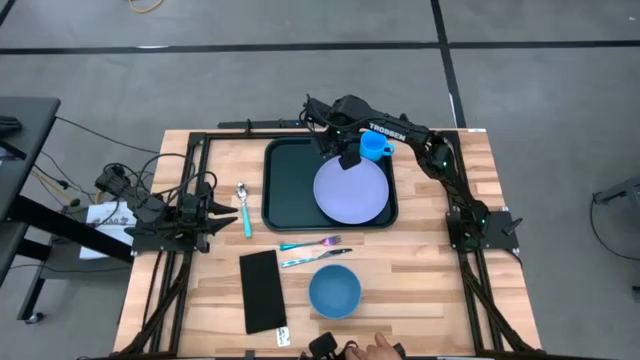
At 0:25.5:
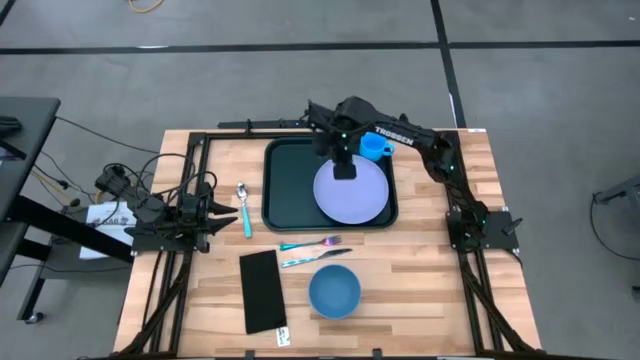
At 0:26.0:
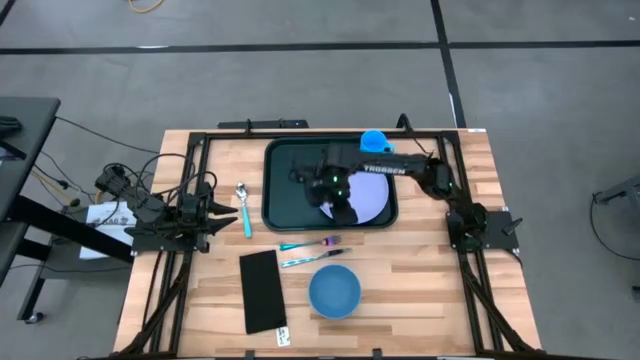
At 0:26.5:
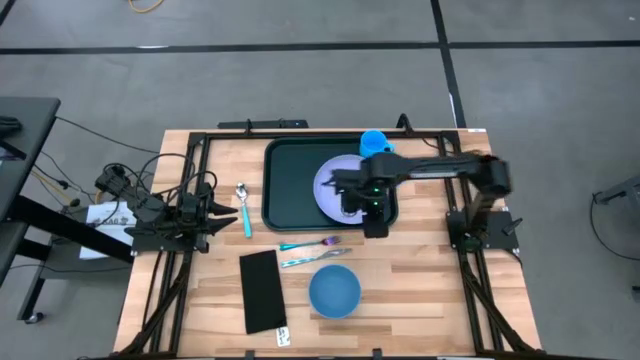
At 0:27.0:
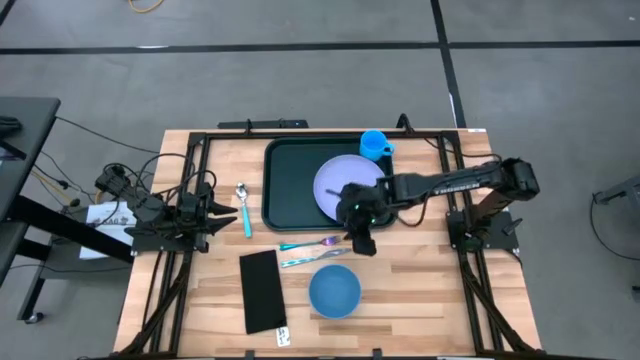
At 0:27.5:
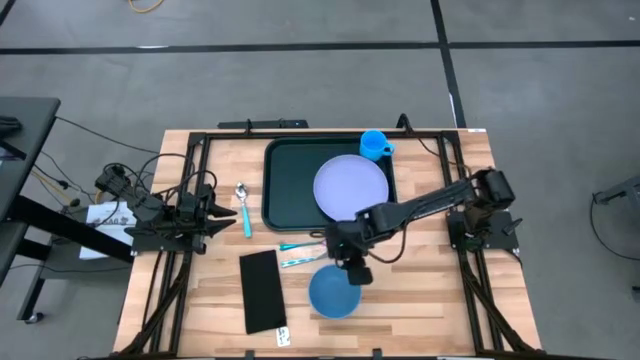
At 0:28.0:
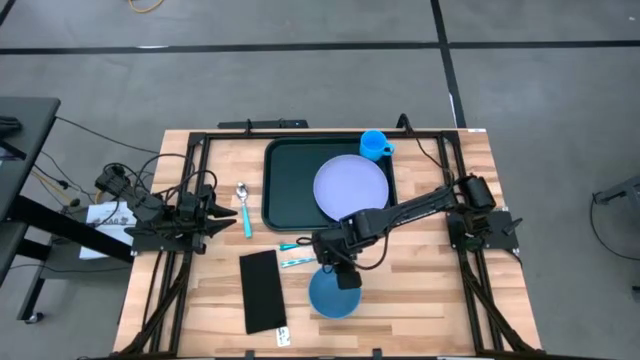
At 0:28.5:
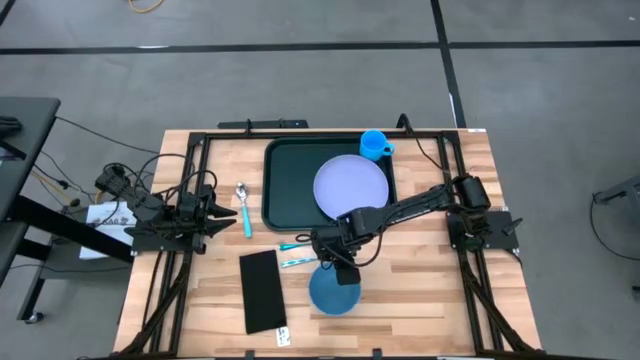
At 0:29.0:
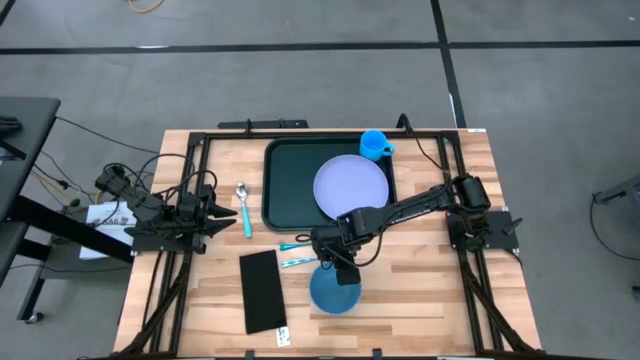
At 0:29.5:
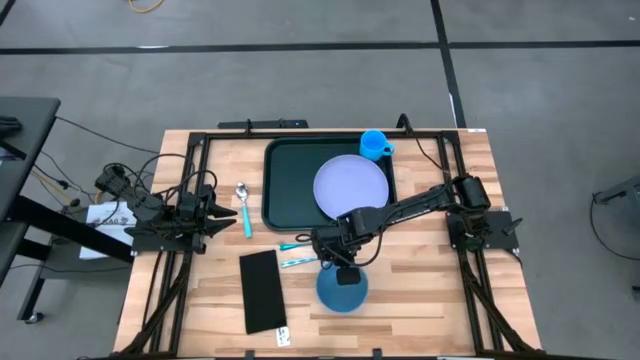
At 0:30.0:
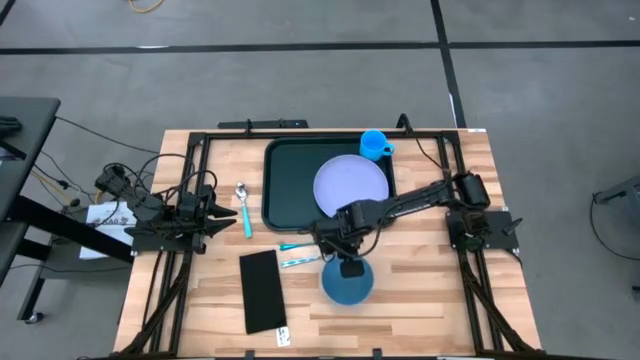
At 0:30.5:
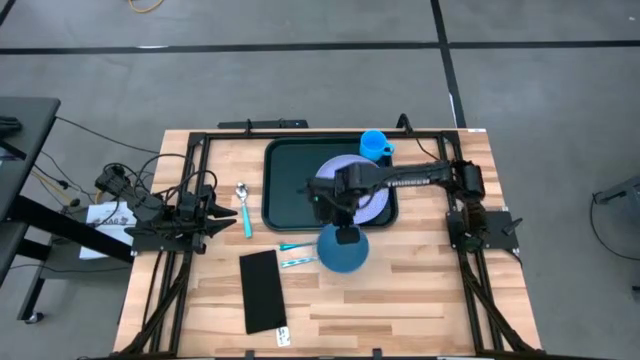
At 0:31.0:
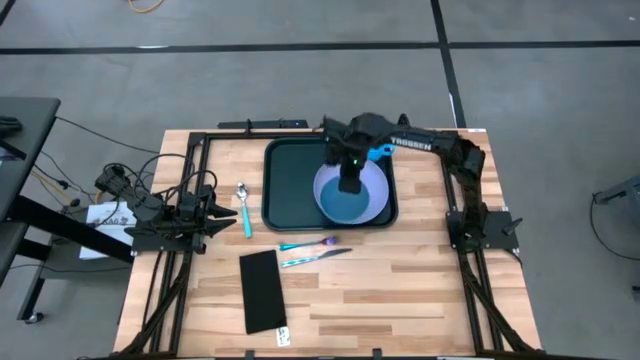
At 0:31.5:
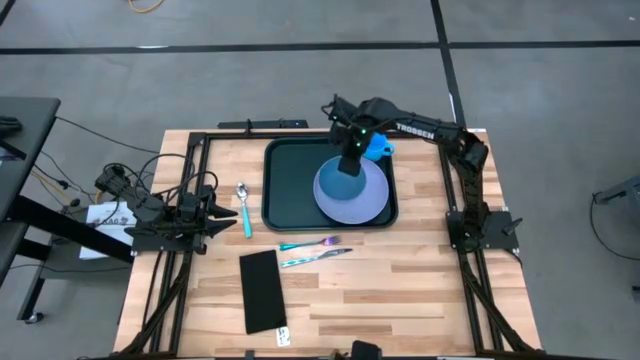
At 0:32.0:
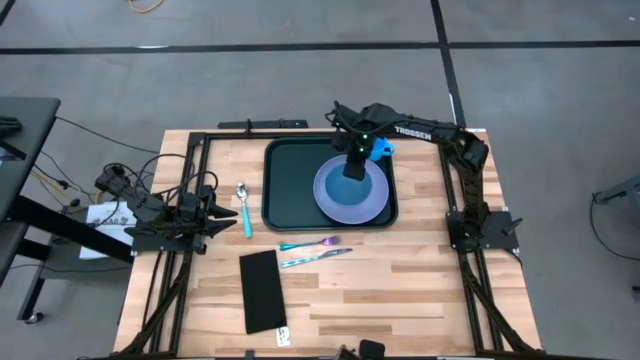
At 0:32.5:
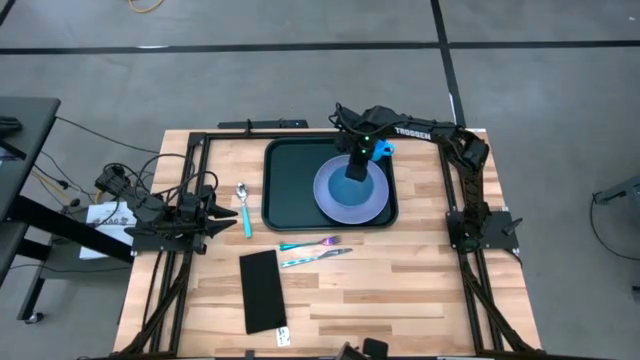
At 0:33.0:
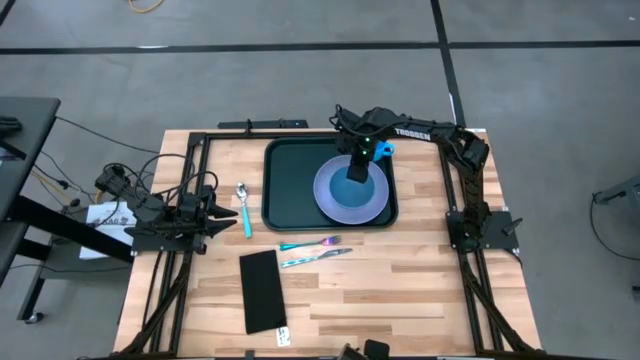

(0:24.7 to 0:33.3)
Task: Set up tray
Put the blue bowl on the light purple plate on the black serving tray

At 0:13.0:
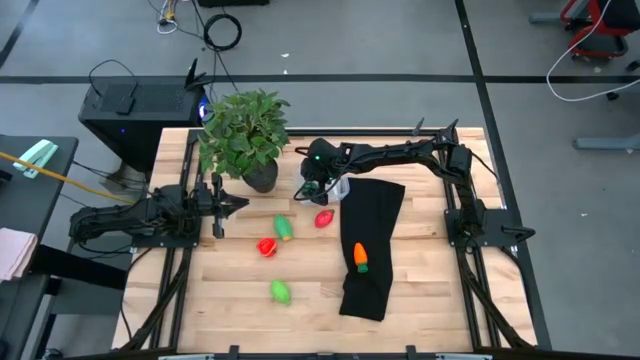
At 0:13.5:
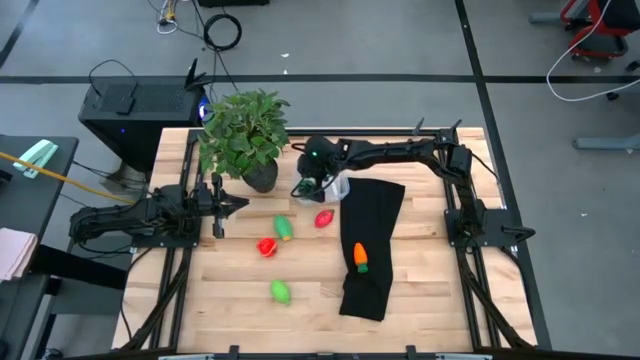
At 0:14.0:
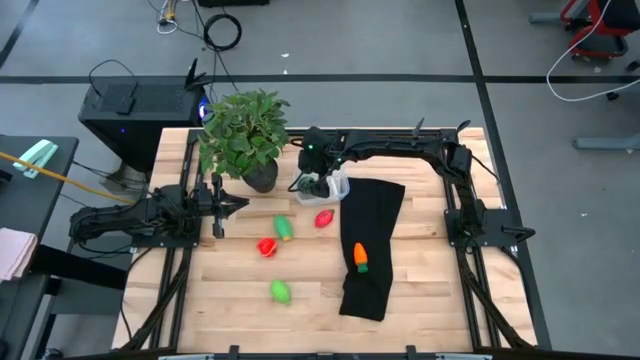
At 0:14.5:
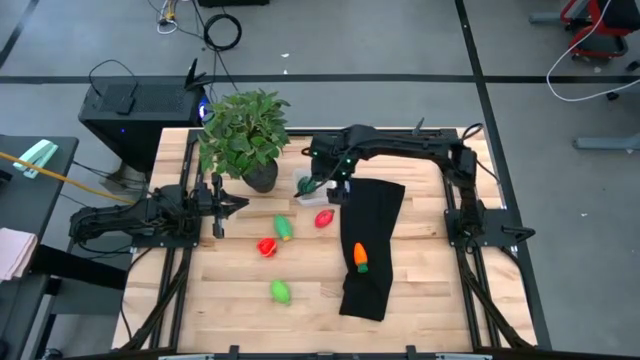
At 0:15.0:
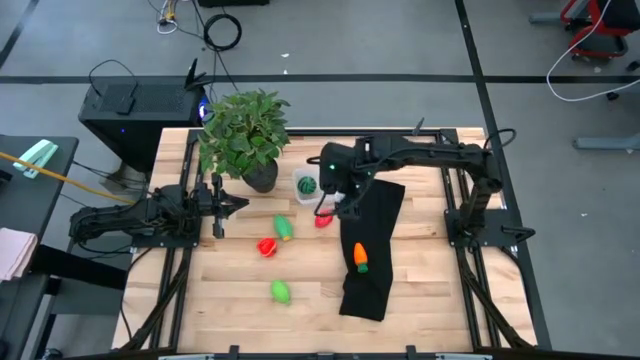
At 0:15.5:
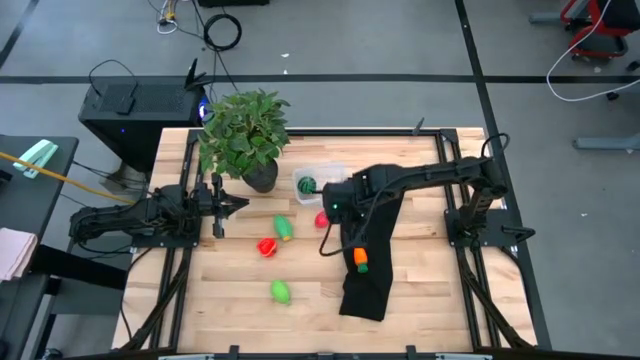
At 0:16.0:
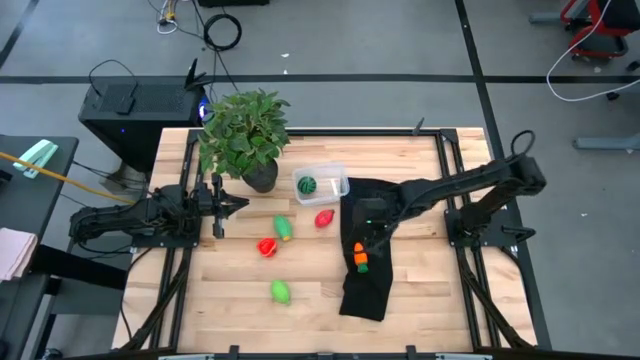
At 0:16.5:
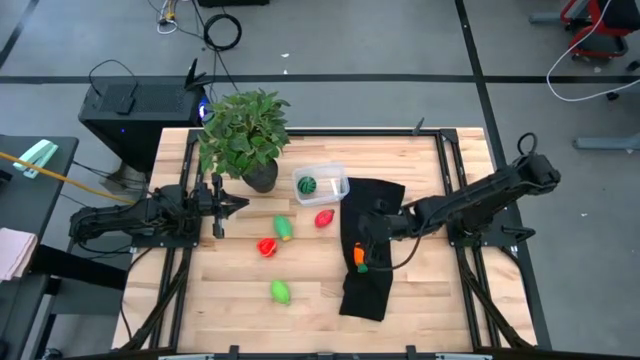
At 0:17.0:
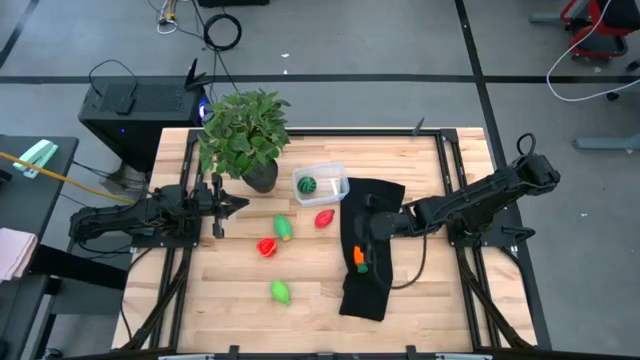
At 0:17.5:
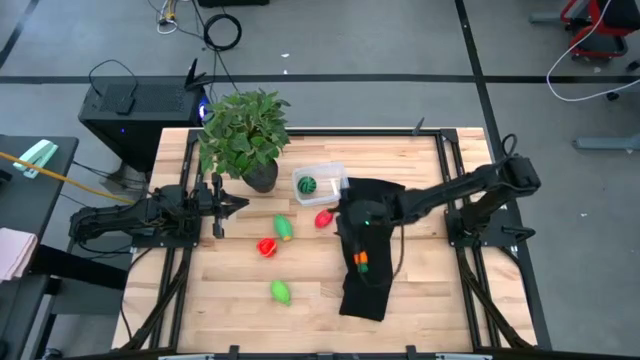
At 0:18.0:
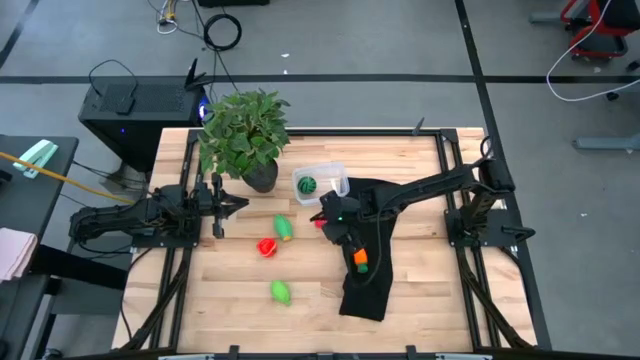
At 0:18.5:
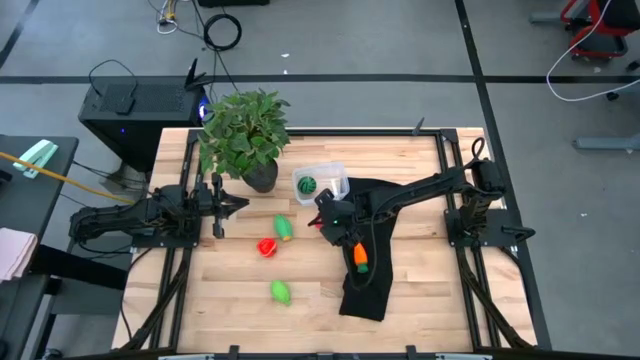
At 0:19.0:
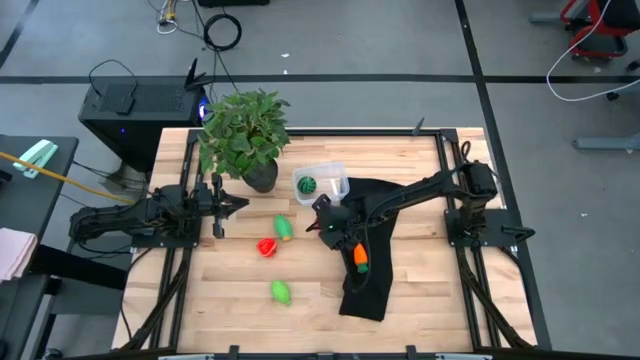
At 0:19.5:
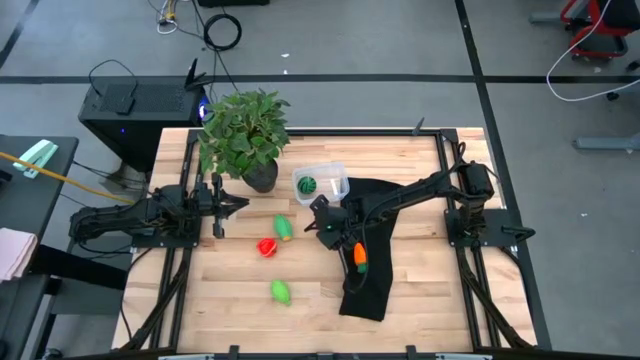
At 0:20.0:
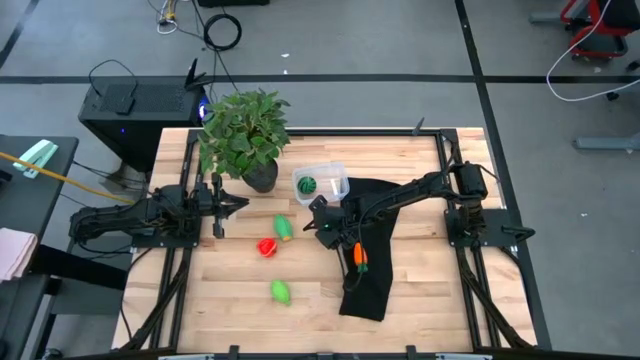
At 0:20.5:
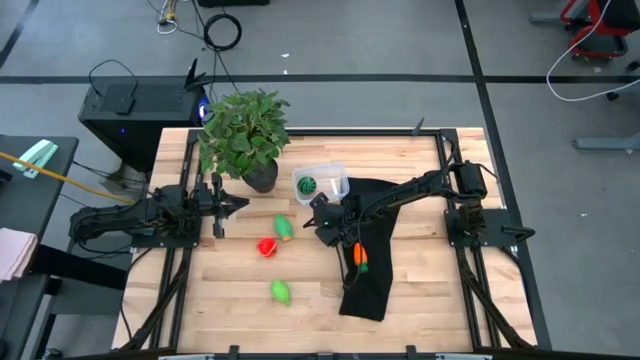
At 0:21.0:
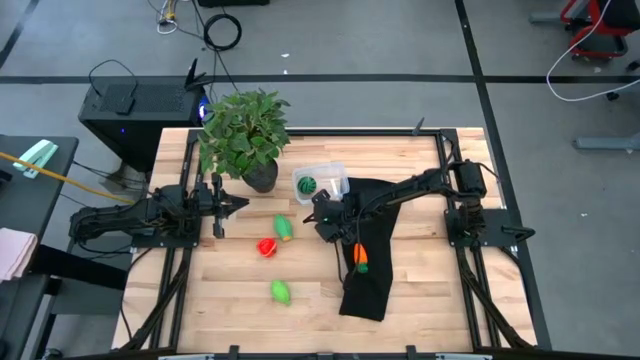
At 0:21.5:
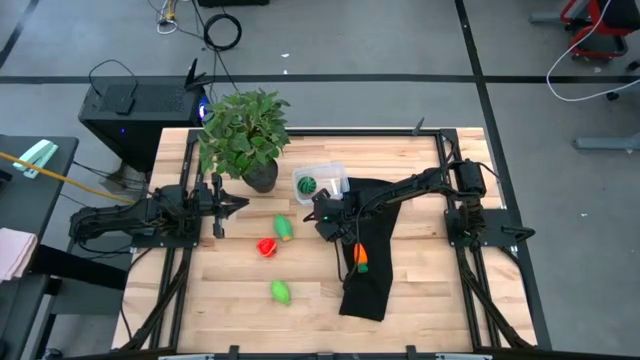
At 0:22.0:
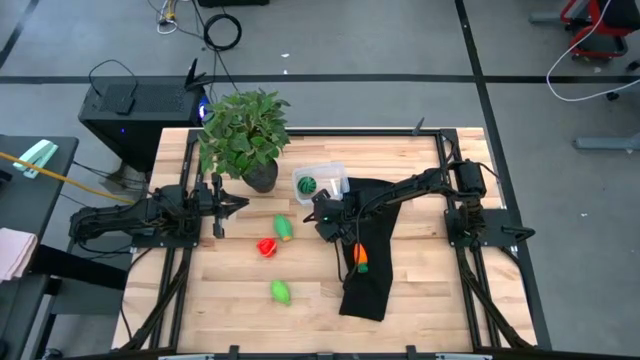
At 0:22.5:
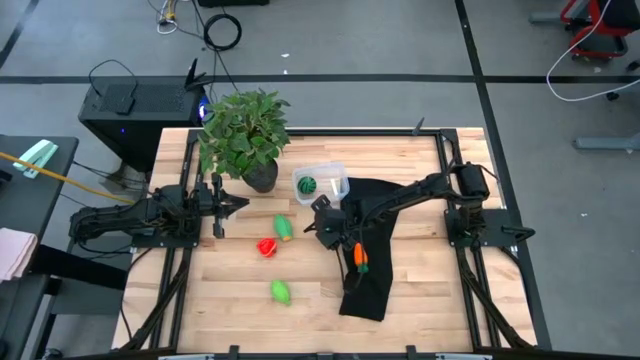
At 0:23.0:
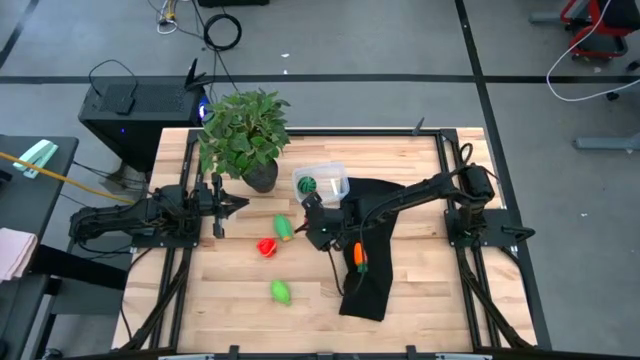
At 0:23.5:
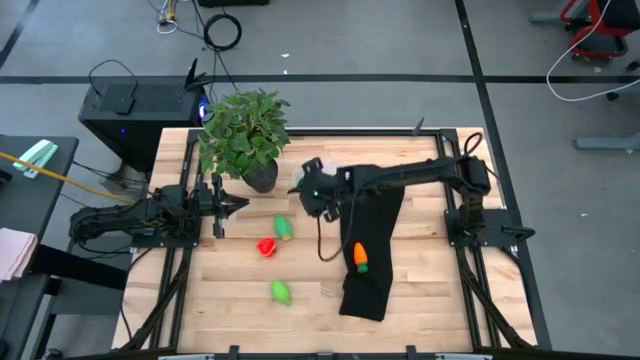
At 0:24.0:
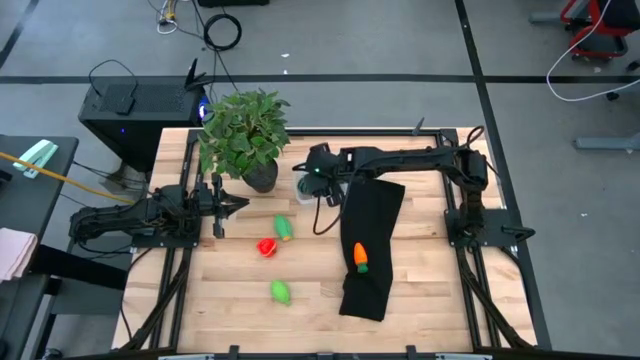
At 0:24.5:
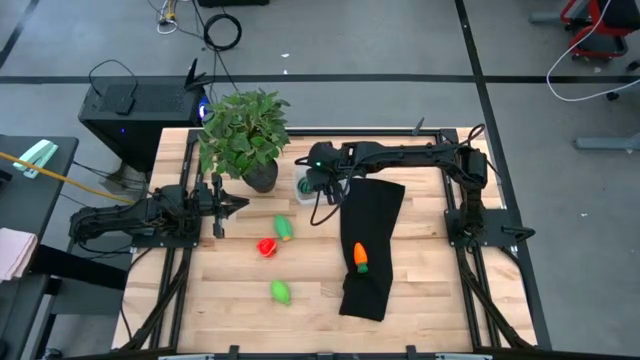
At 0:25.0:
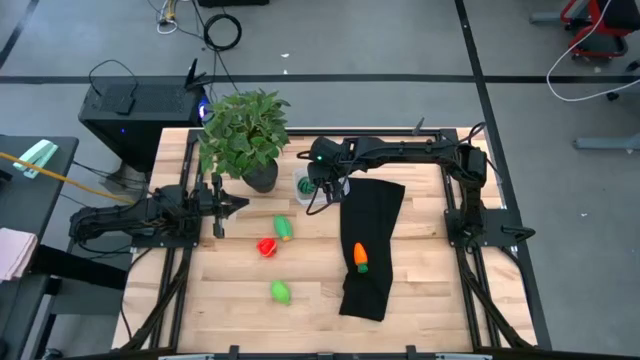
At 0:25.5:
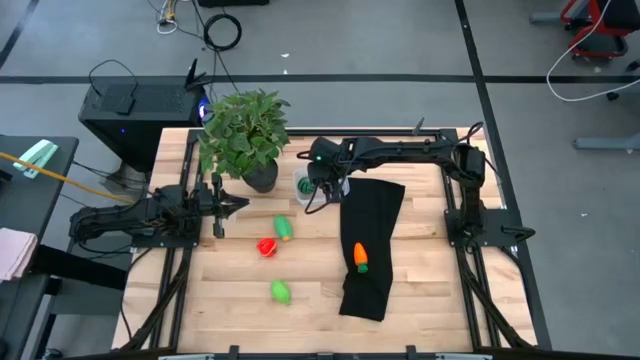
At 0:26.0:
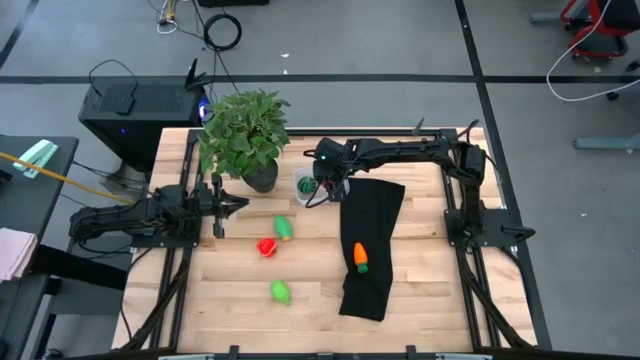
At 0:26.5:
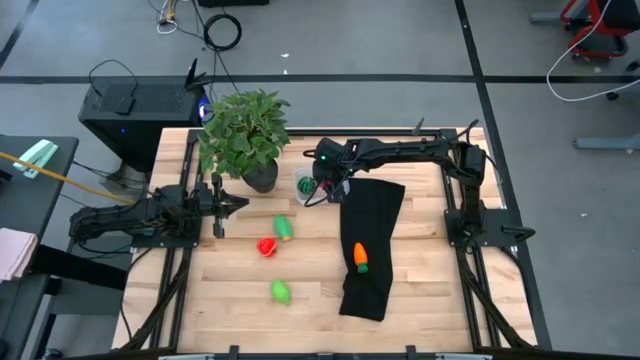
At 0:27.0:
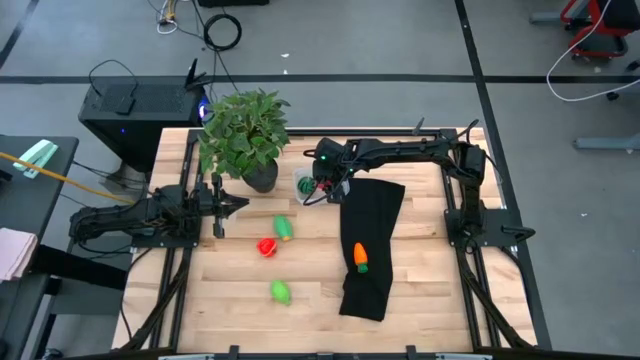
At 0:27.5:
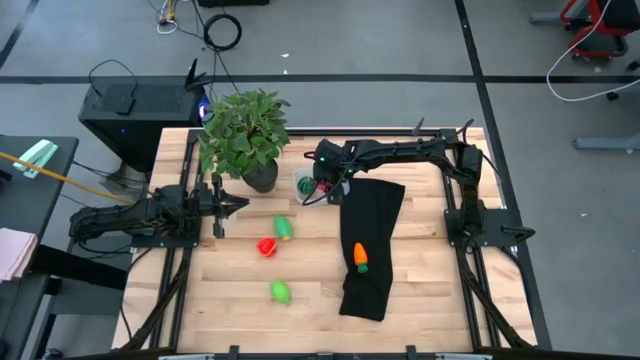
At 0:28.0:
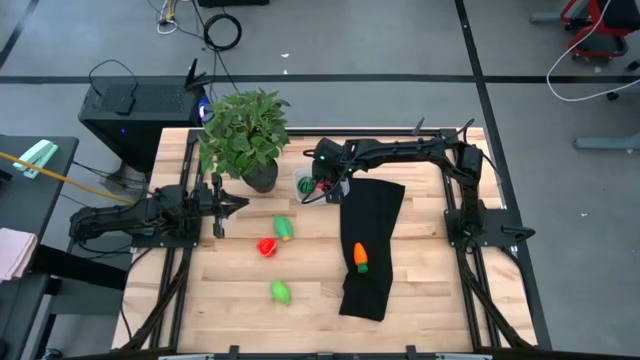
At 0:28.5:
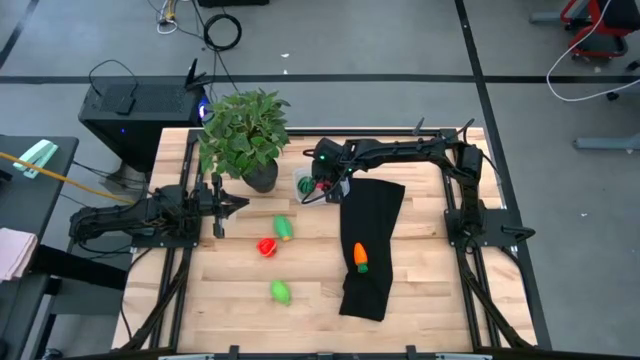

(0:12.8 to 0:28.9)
Task: Pick and placing Produce into tupperware
Put the red dragonfruit into the transparent bin
